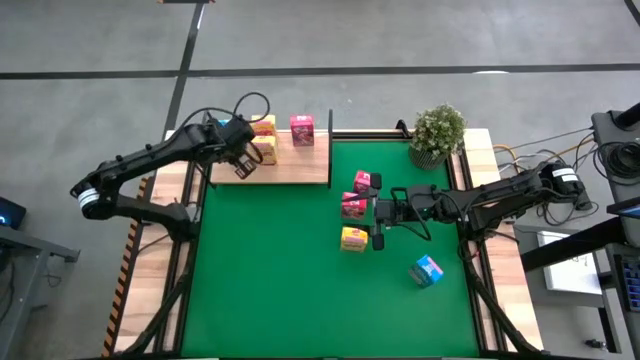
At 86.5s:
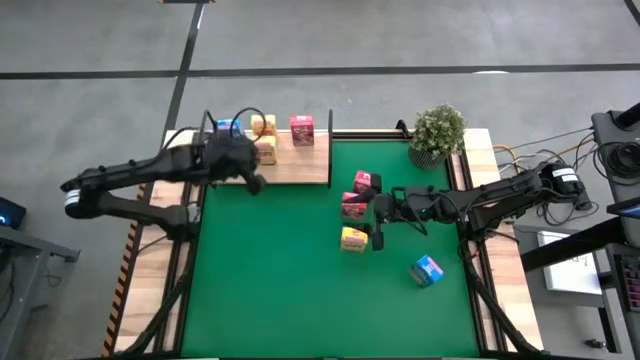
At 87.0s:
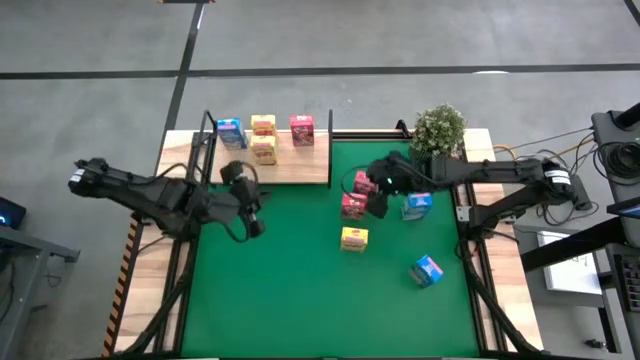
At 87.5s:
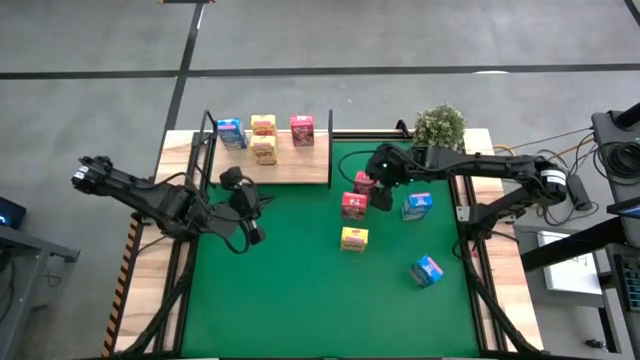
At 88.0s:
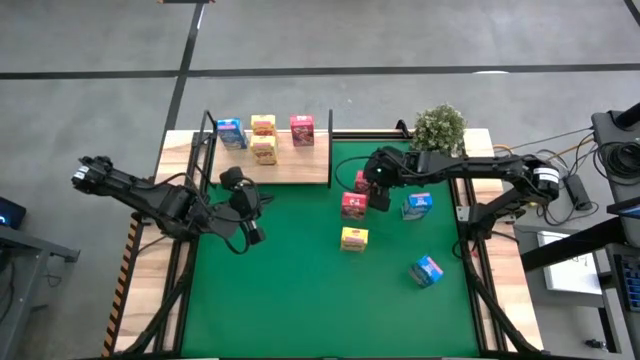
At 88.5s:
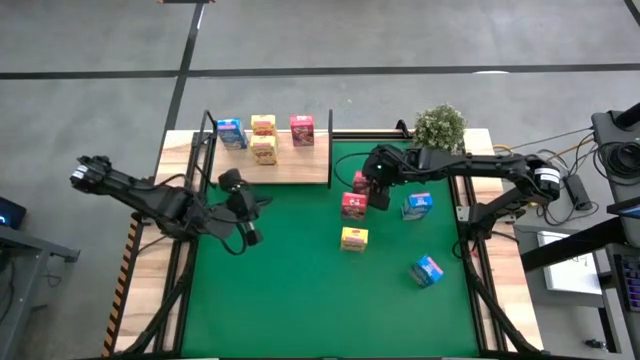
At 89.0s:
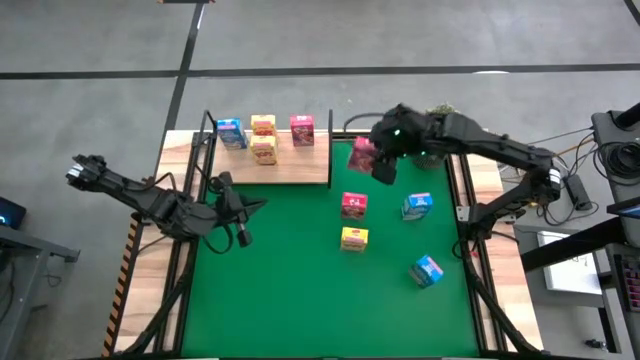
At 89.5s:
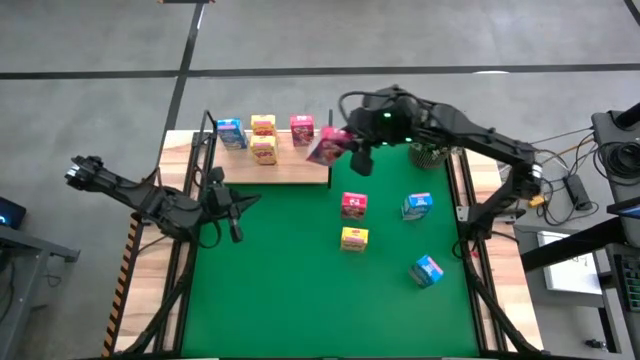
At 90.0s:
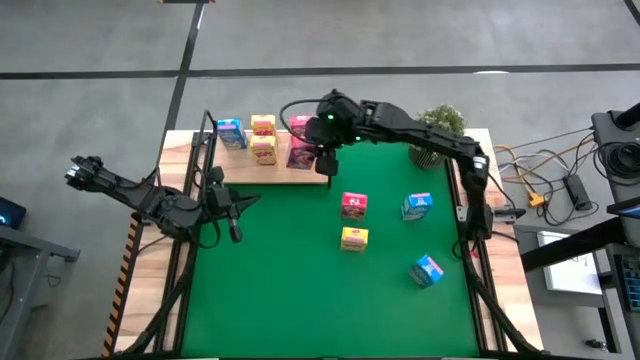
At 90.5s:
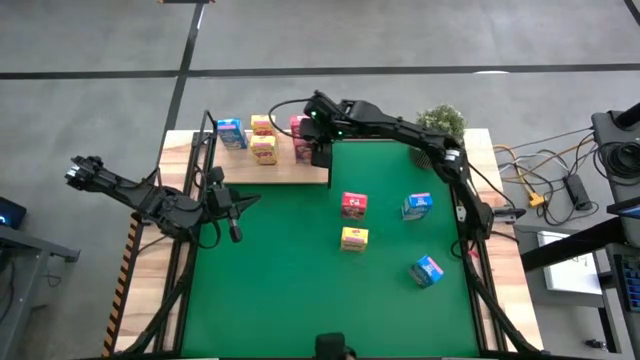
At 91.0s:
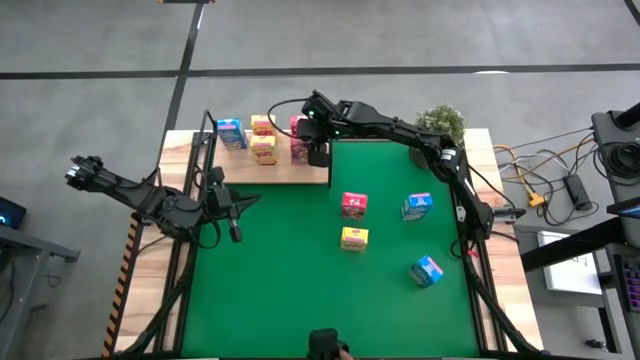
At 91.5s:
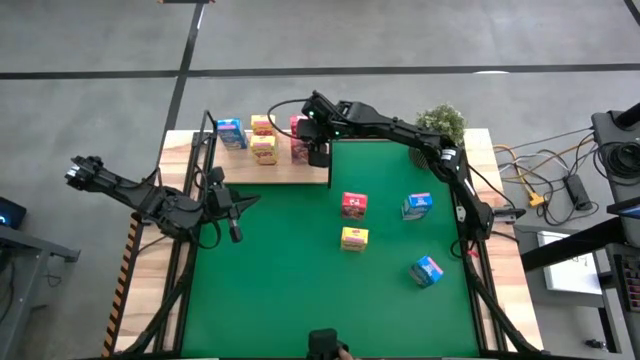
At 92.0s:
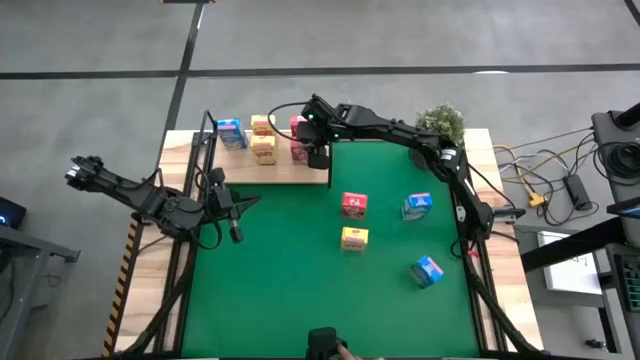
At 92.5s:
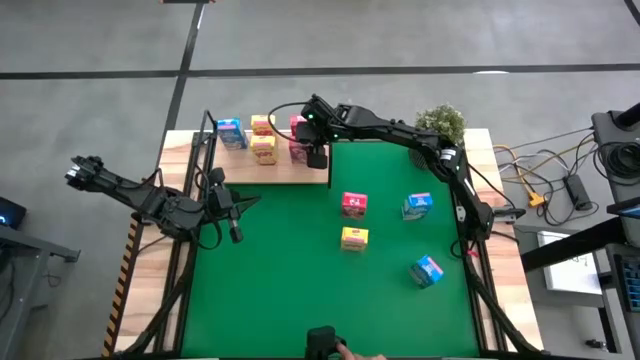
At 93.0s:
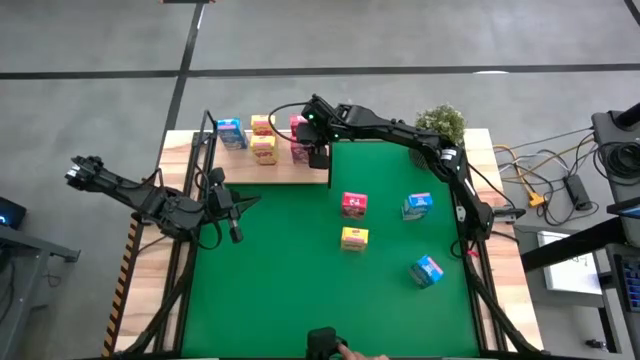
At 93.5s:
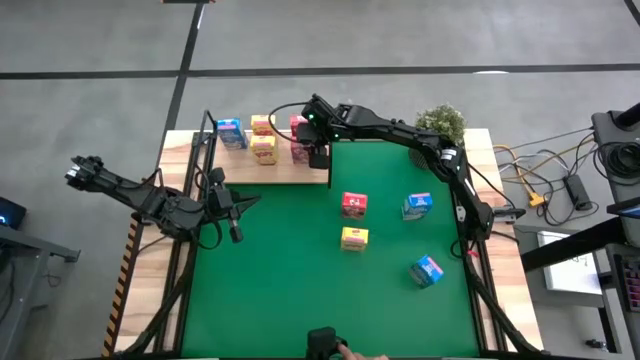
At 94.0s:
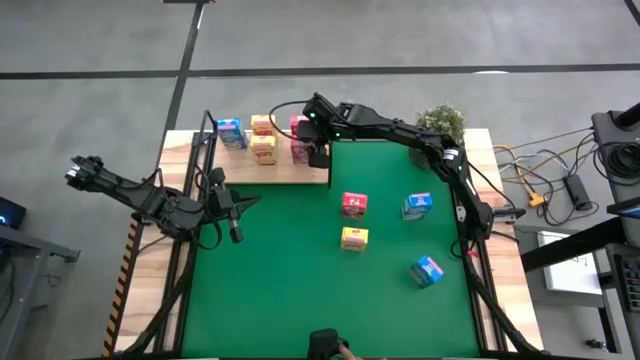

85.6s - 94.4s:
Task: Stack cereal on shelf
Put the top red cereal box aligned with the red cereal box on the shelf

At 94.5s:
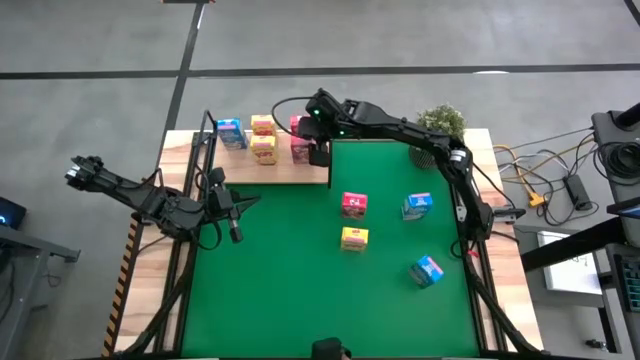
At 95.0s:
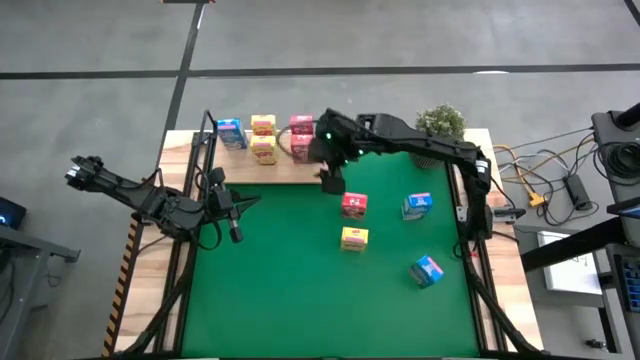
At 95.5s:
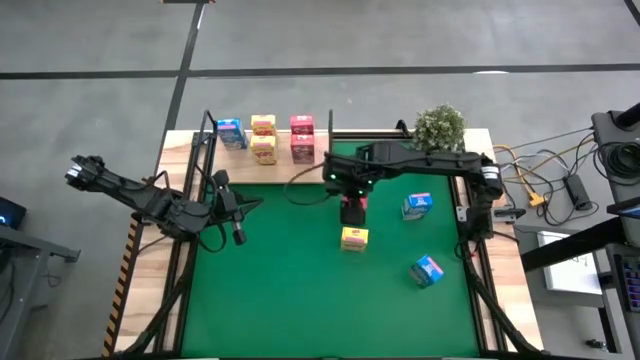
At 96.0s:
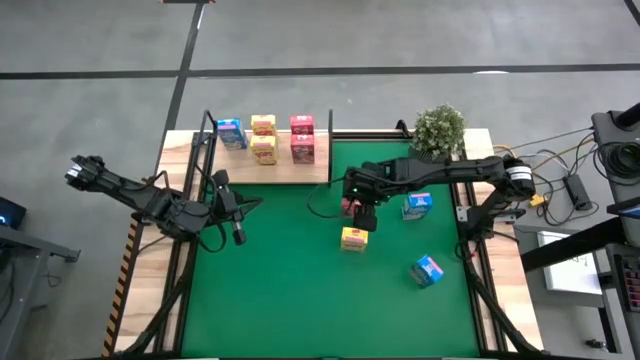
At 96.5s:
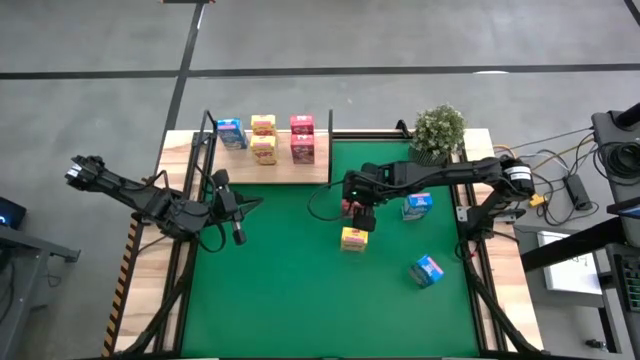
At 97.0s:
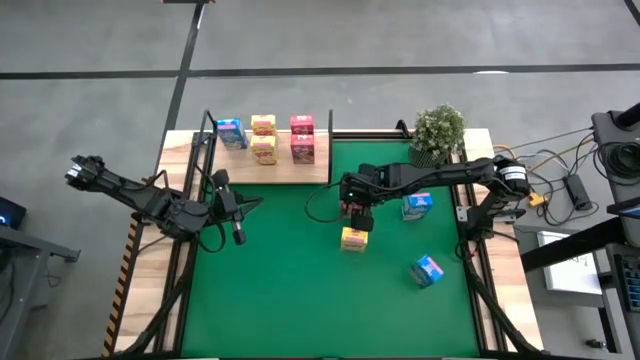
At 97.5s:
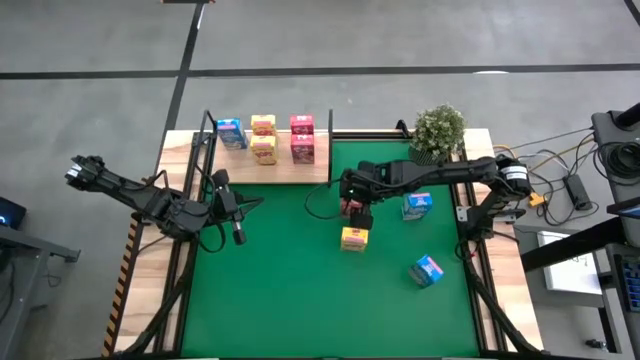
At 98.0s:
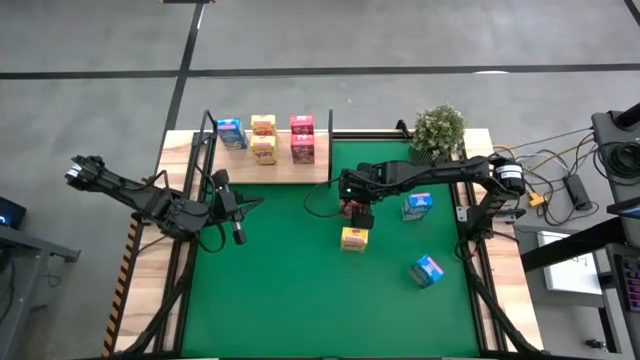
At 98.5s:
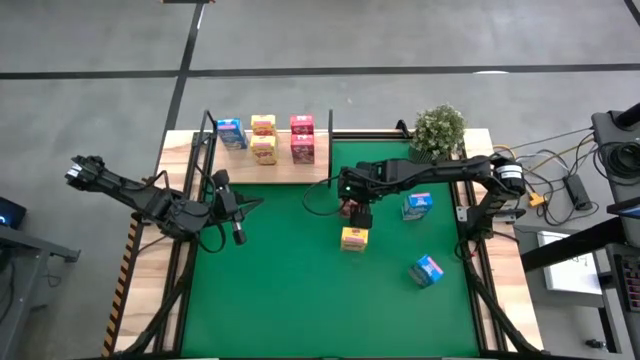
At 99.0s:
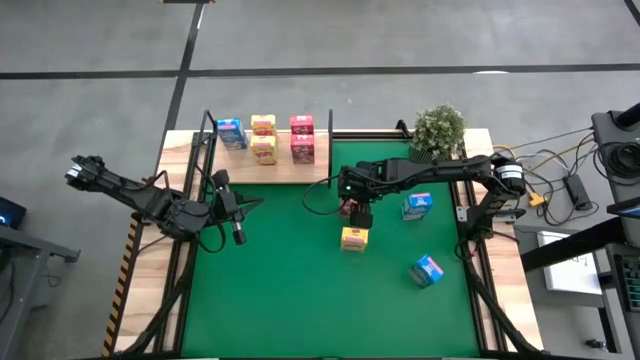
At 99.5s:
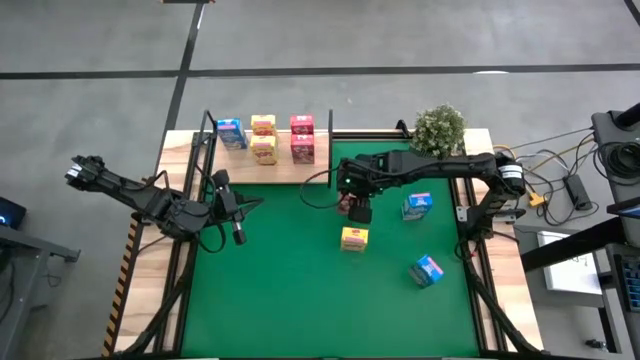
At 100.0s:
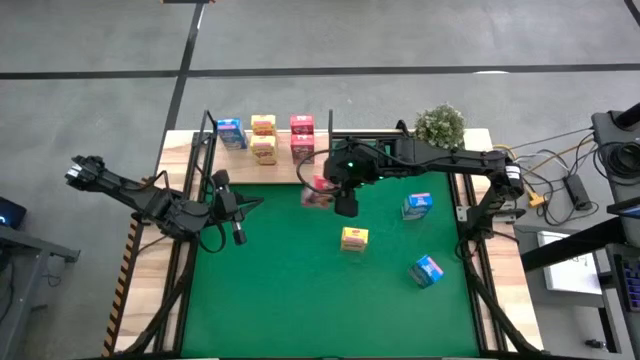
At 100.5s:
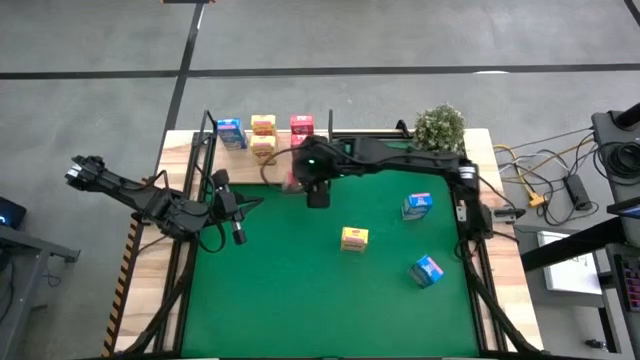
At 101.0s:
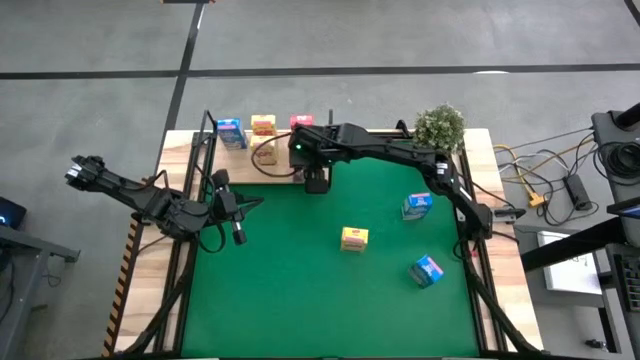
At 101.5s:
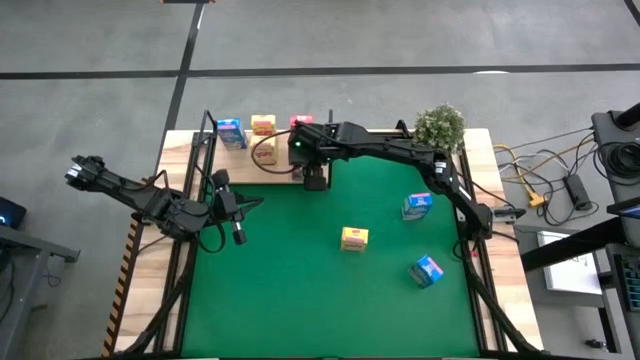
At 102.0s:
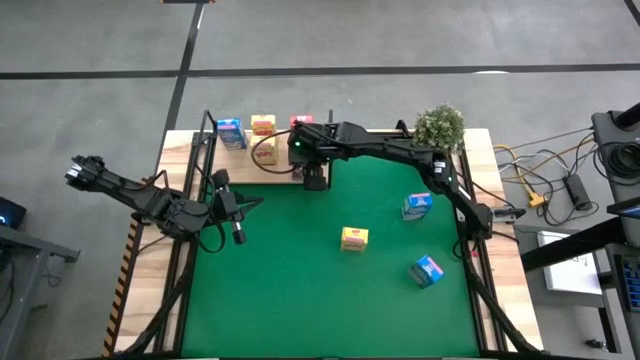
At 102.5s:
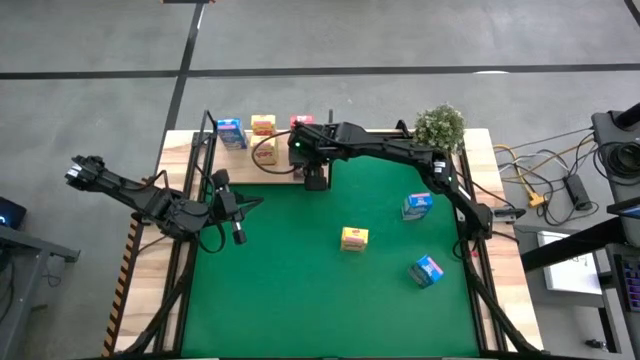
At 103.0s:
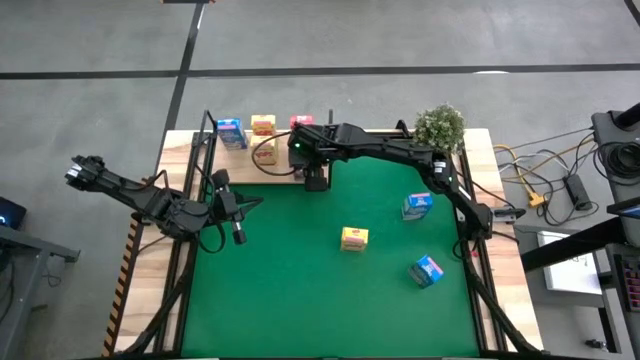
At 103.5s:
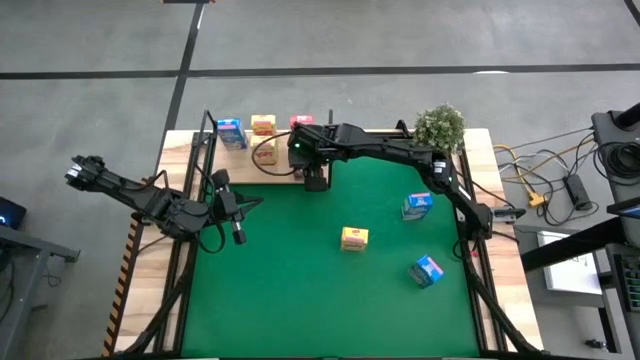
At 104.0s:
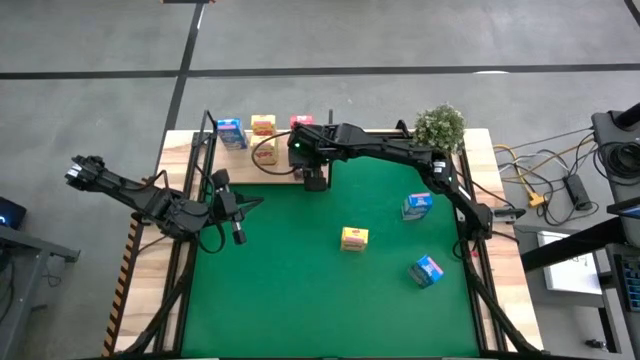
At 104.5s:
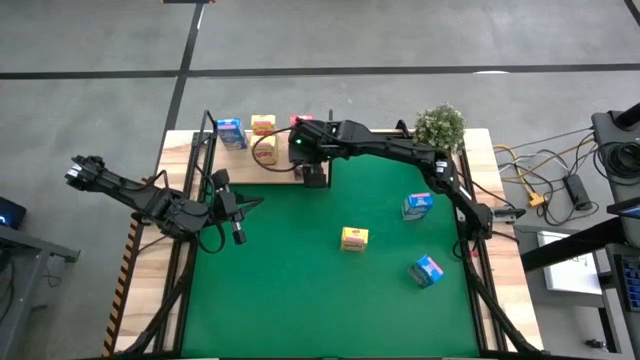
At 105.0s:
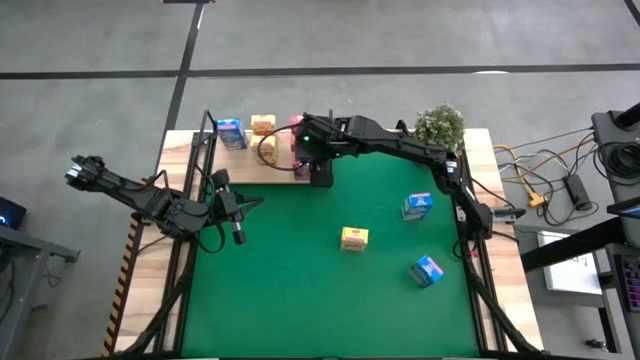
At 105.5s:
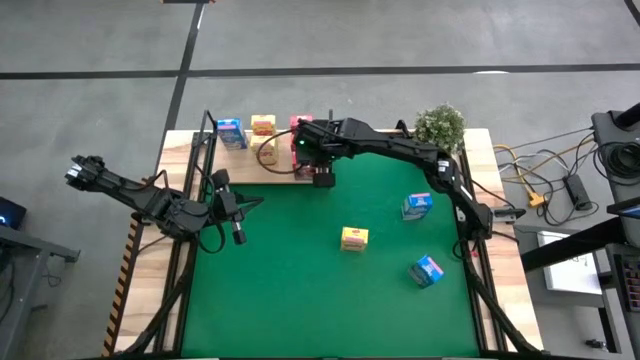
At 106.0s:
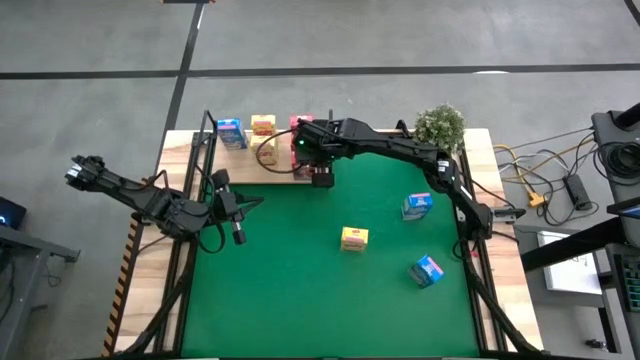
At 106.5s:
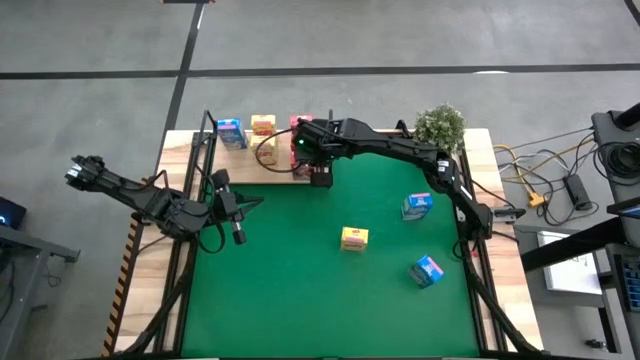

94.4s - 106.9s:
Put the red cereal box aligned with the red cereal box on the shelf

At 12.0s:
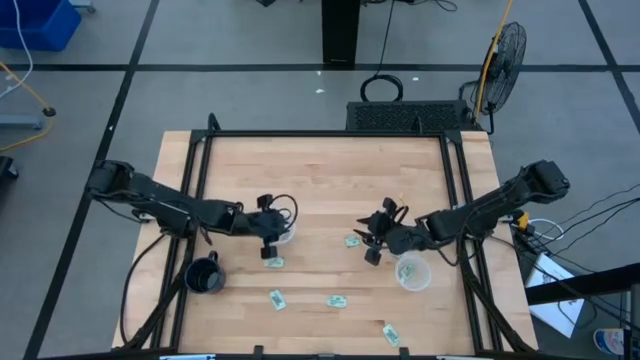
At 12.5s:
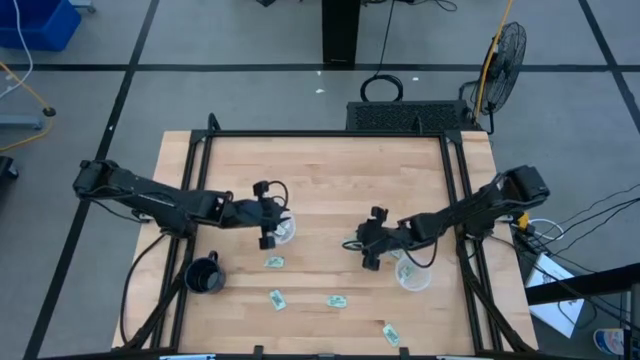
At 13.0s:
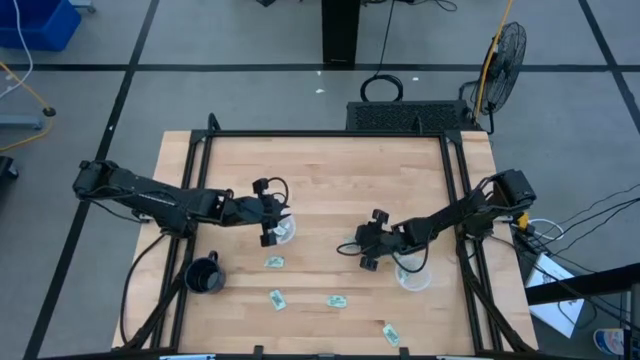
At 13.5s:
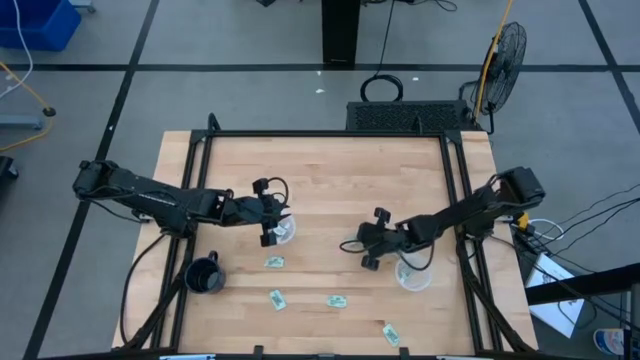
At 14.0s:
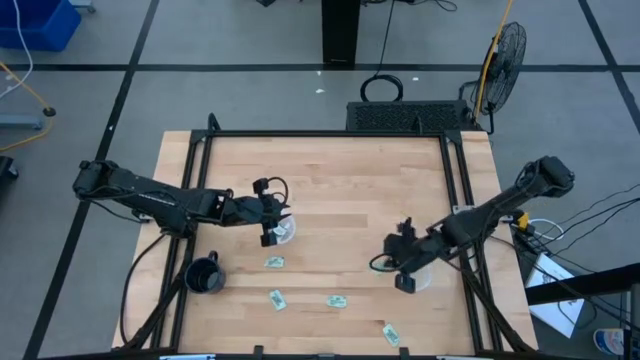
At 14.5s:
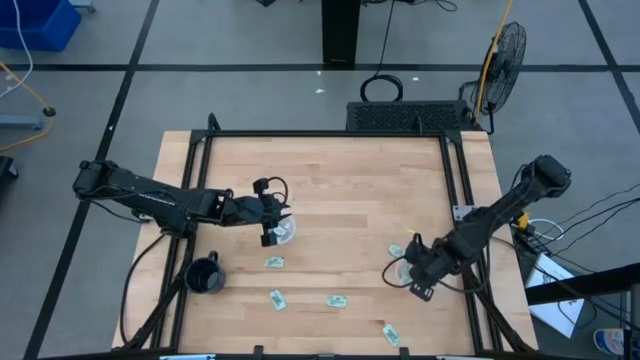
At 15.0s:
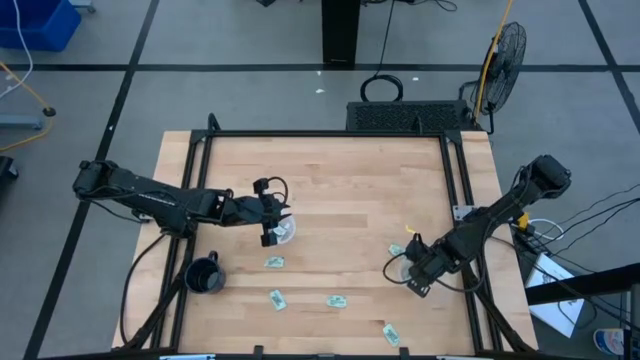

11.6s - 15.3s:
Task: Pick and place Stevia / Truvia into bins
Put the green stevia packet into the right transparent container
